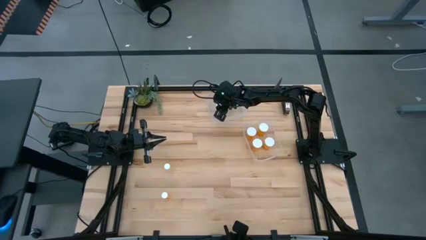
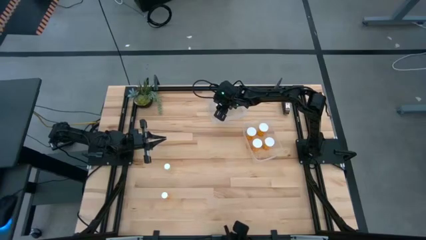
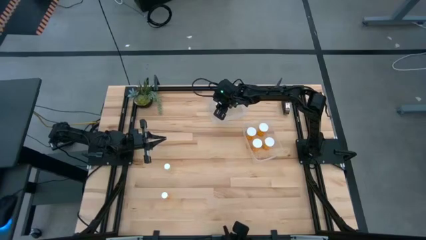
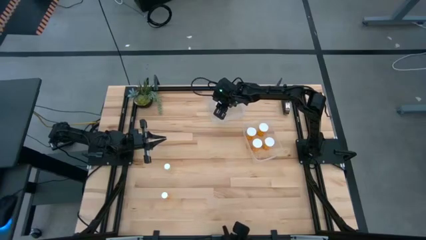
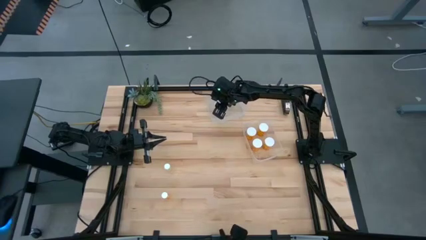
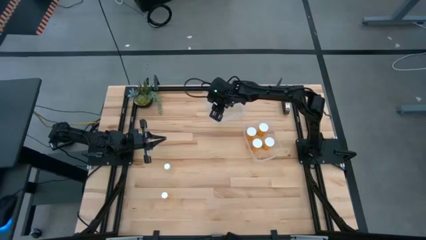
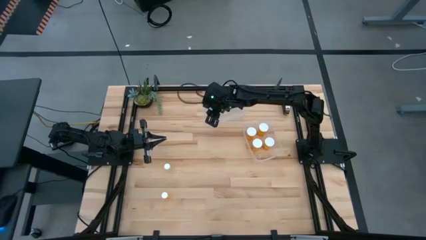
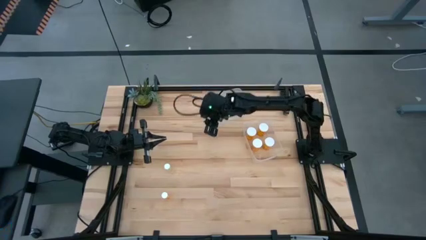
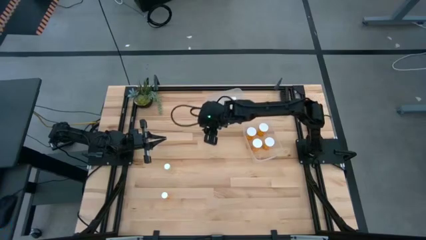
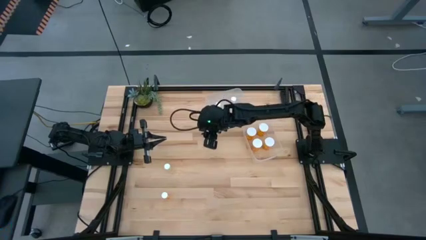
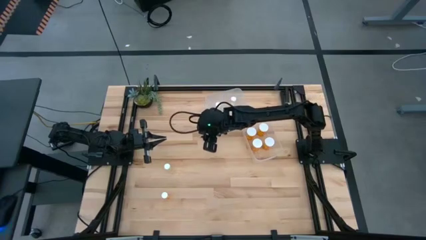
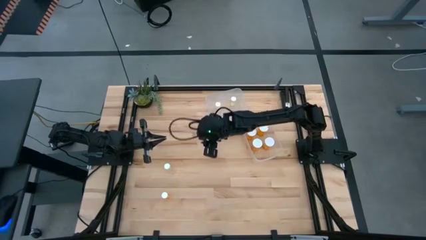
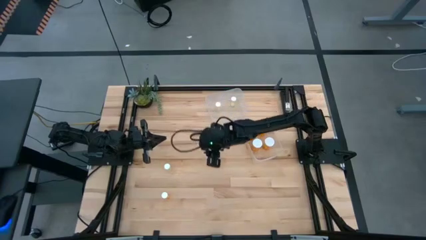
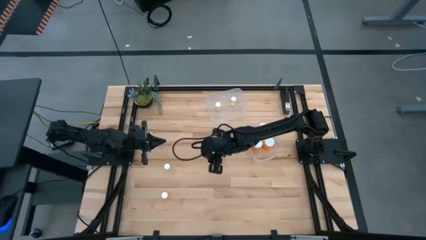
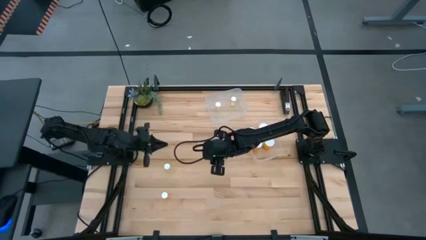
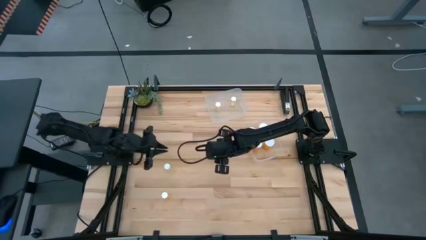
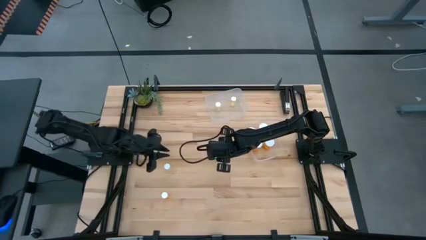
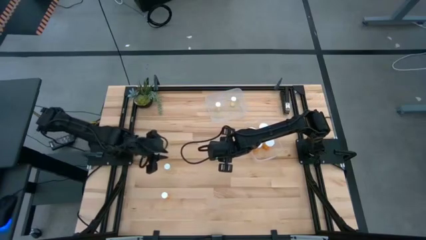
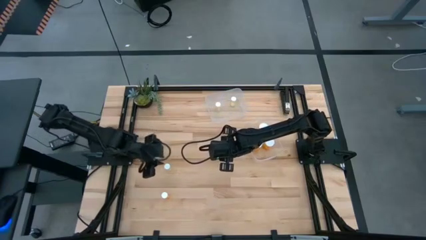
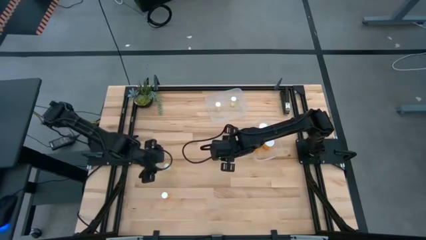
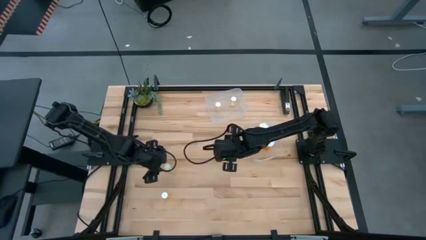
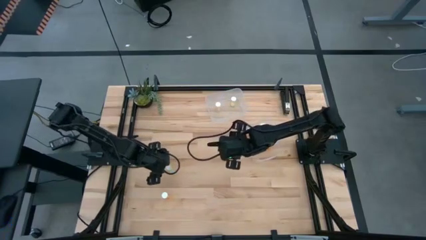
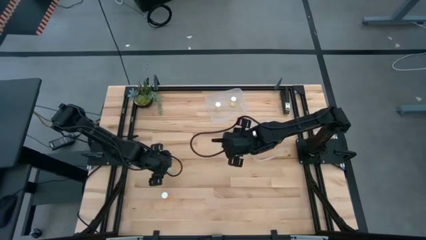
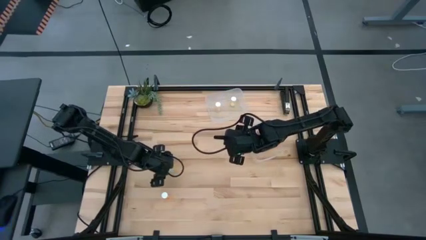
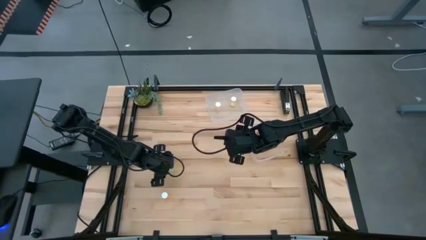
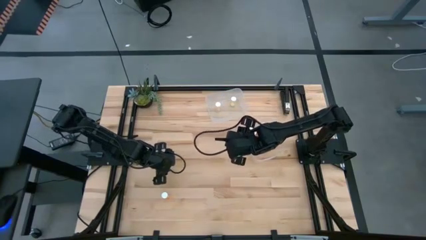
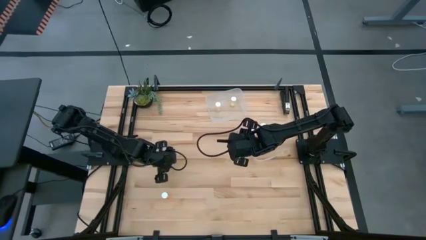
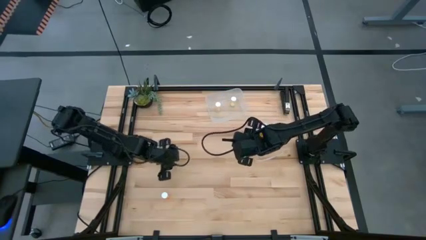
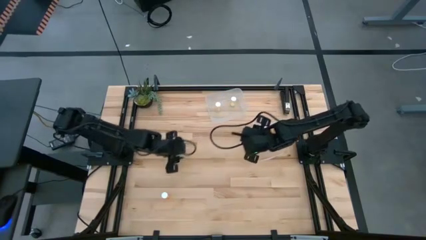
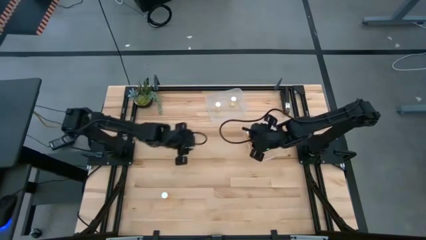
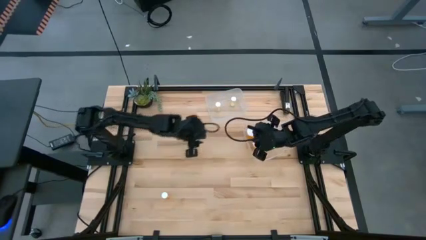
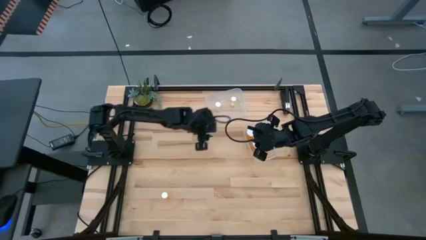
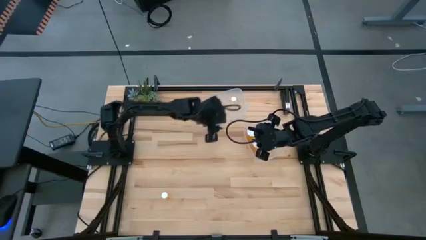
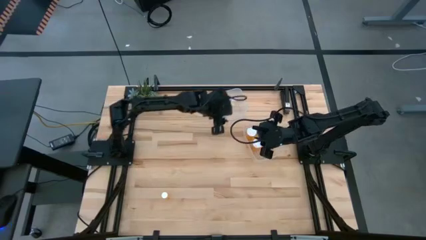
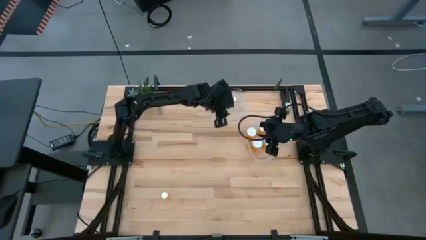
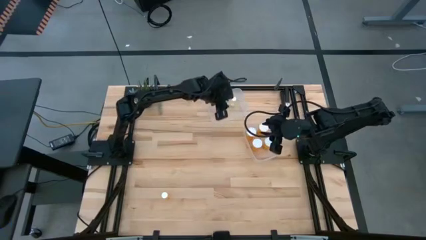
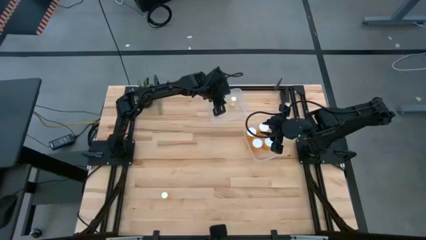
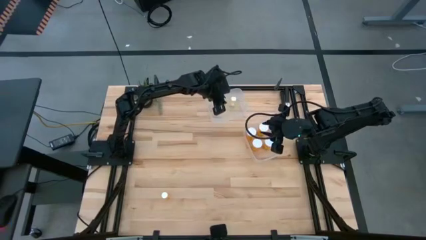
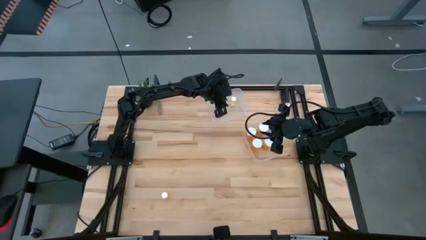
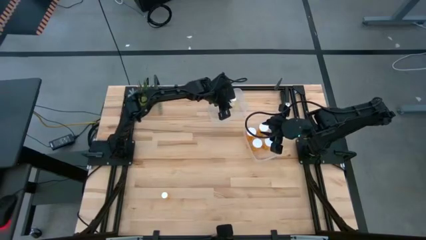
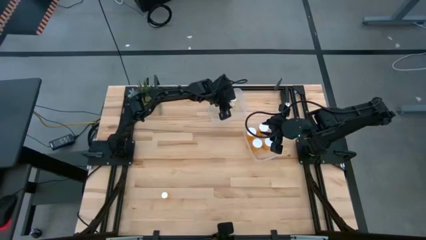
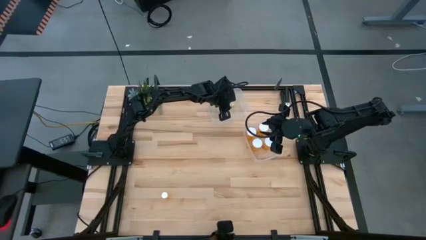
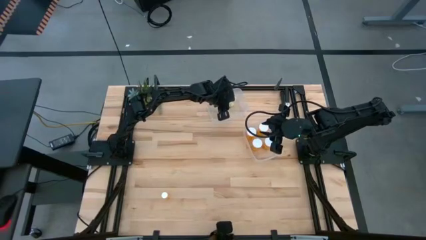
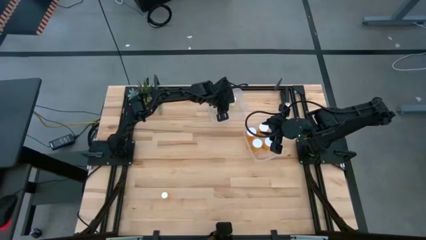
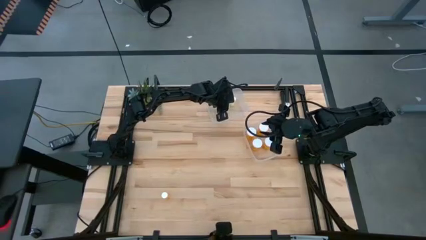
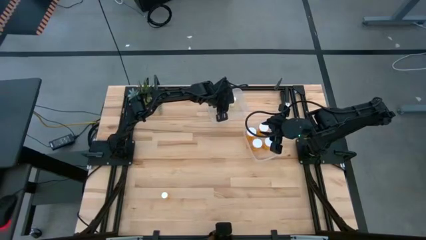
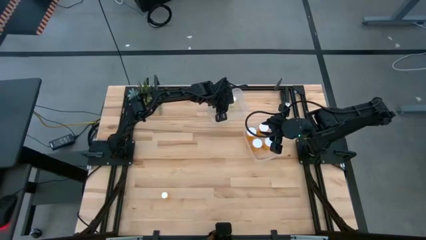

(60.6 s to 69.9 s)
Task: Pick and place medicine bottles into bin by pill shape (circle, oval)
Put the small yellow pill bottle into the top transparent bin

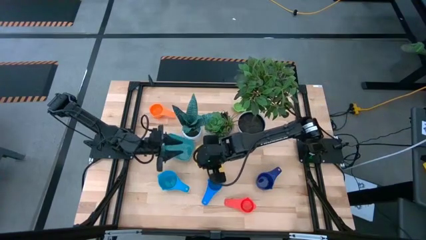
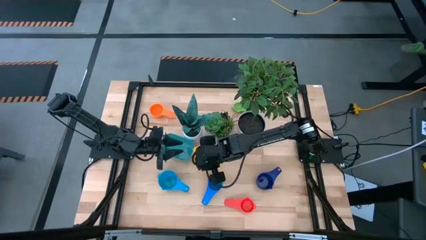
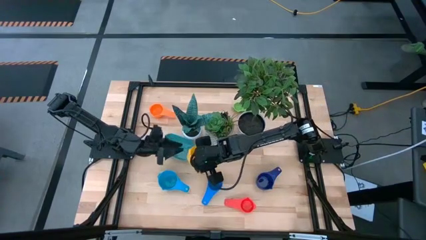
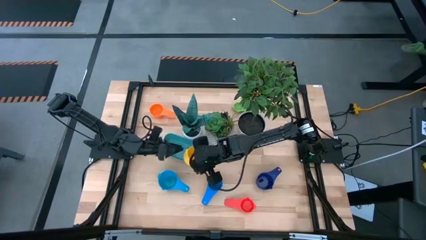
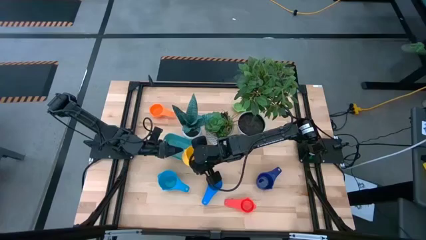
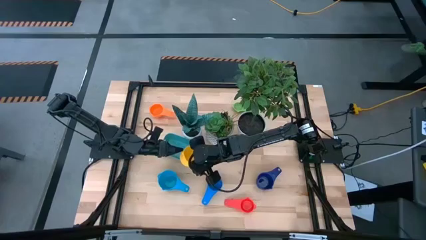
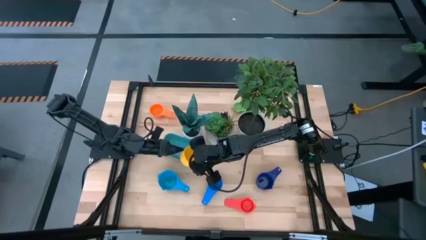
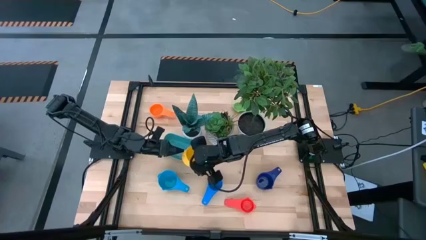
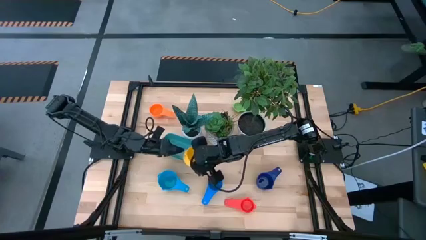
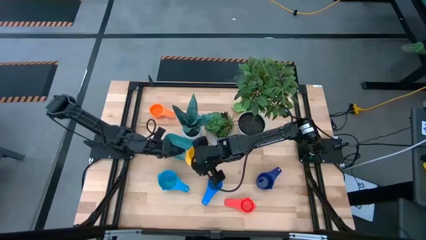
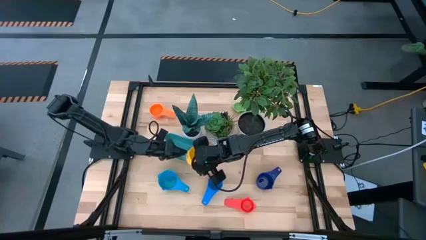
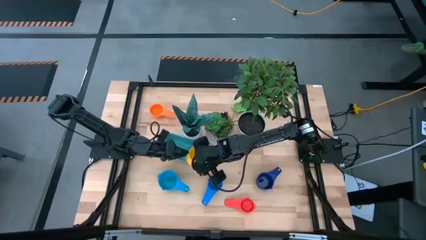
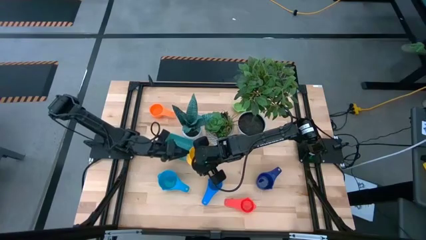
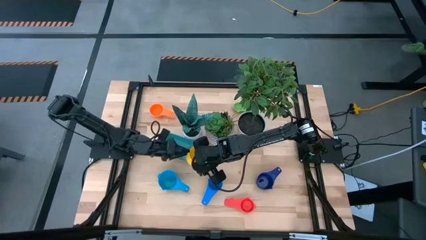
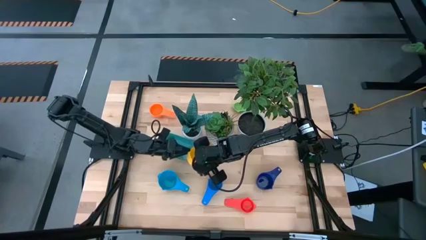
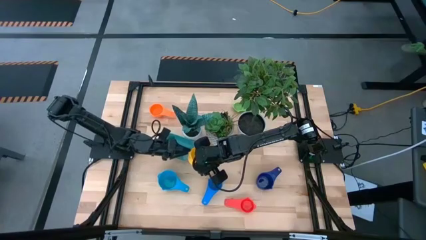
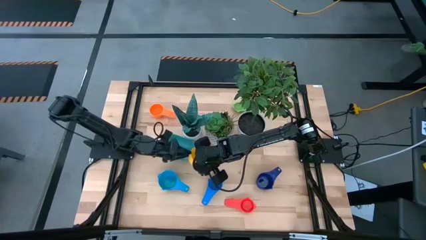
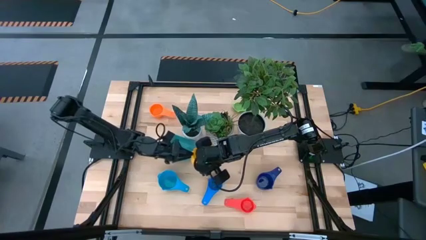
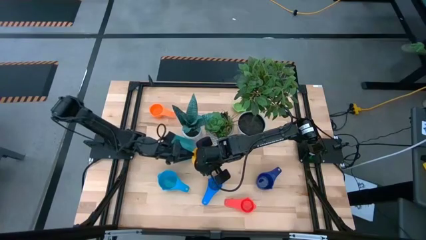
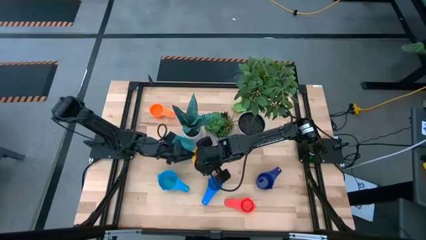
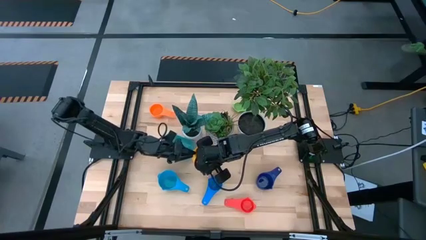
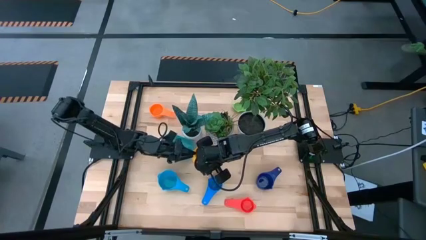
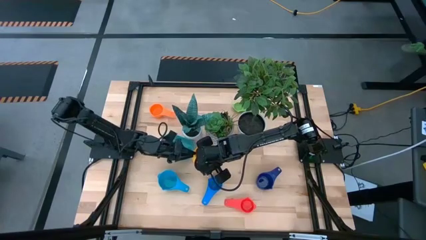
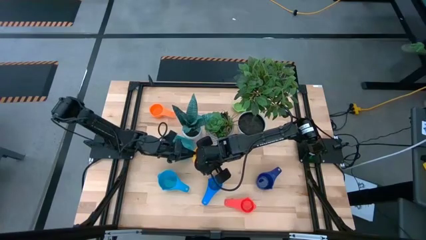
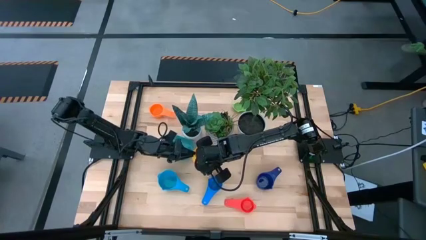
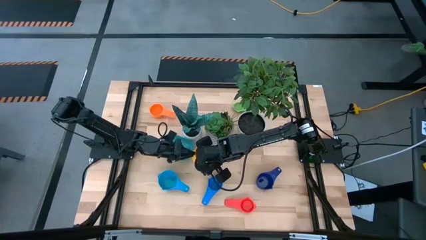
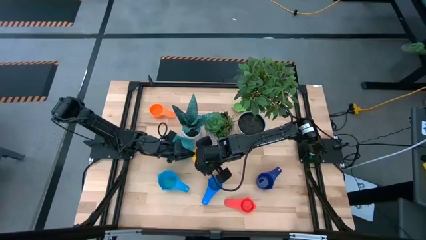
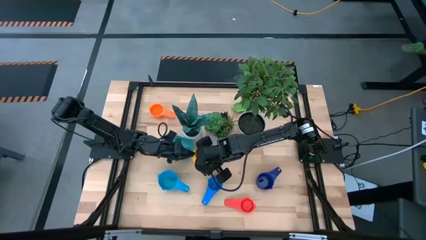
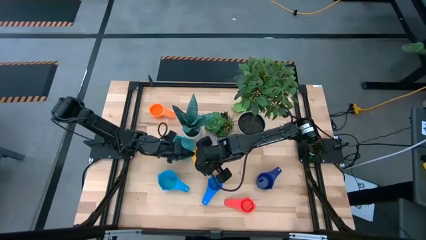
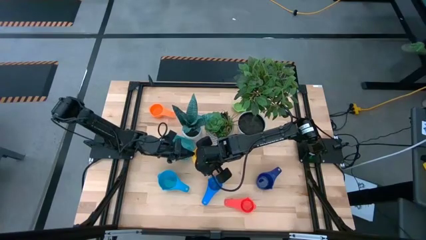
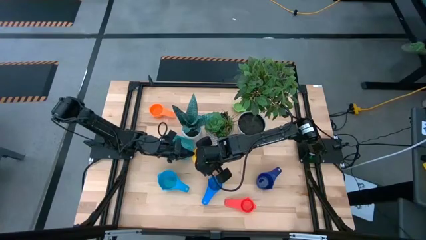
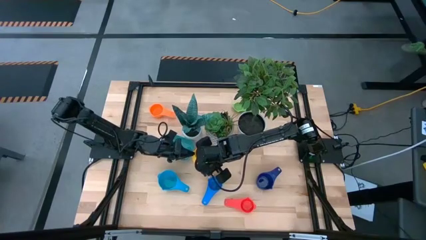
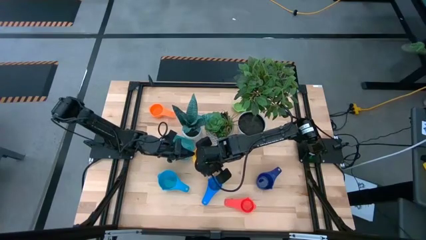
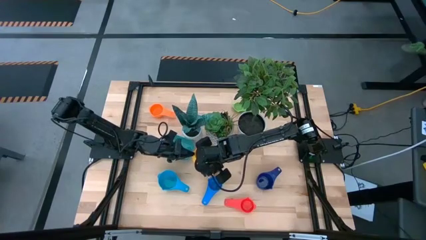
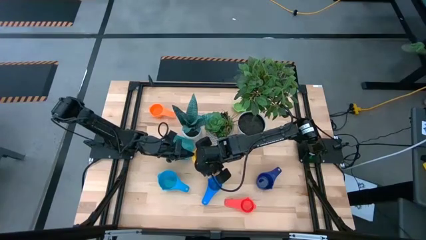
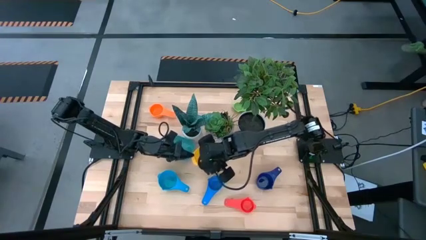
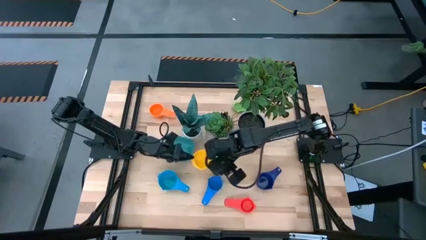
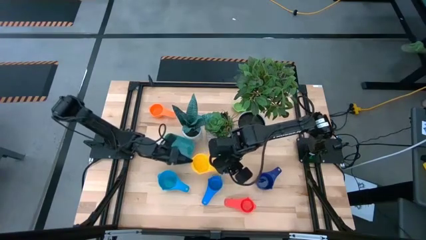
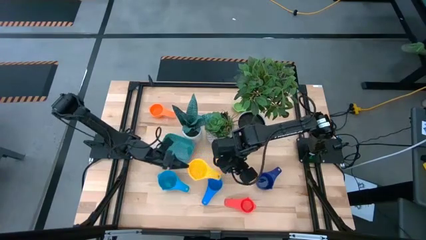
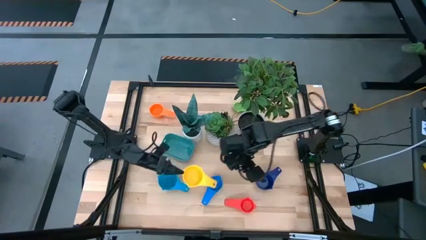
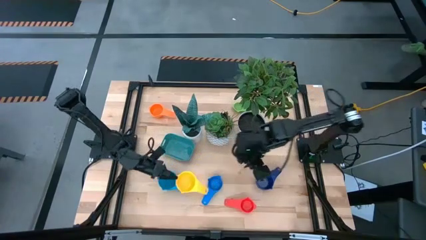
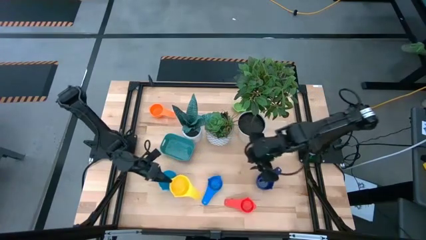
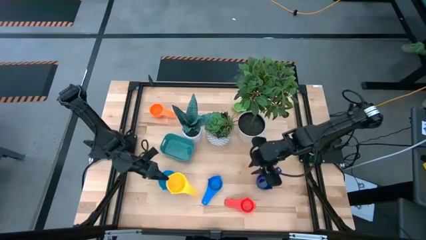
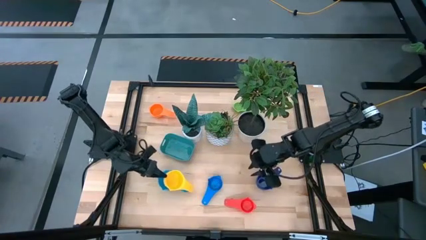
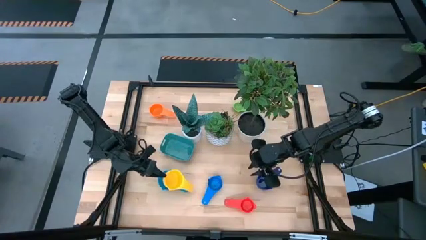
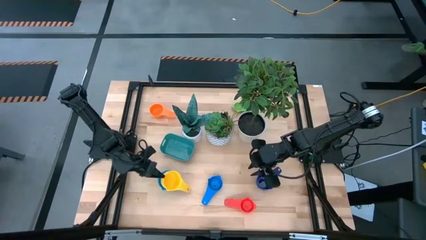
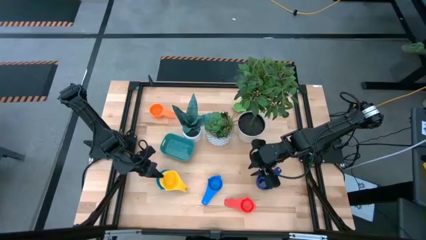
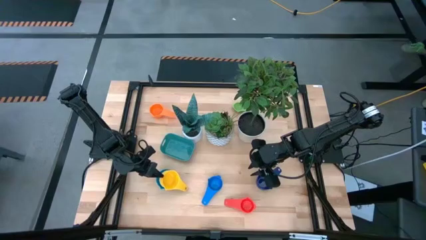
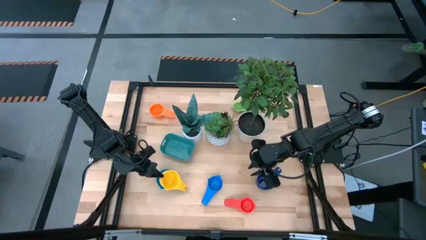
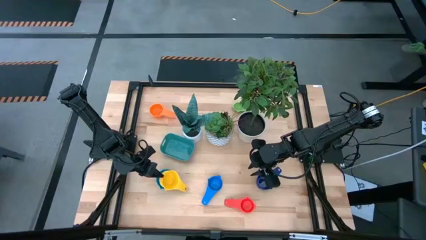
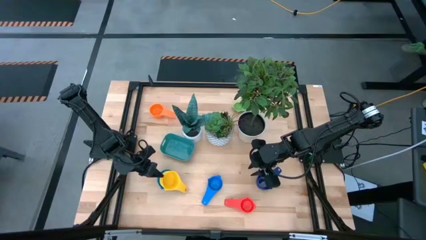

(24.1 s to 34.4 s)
Task: Nest measuring cups in basket
Stack the yellow measuring cup into the light blue measuring cup
